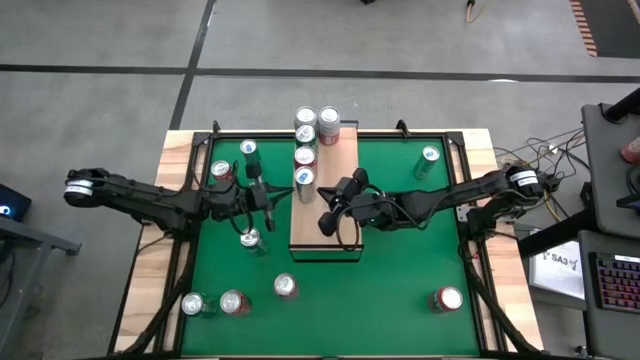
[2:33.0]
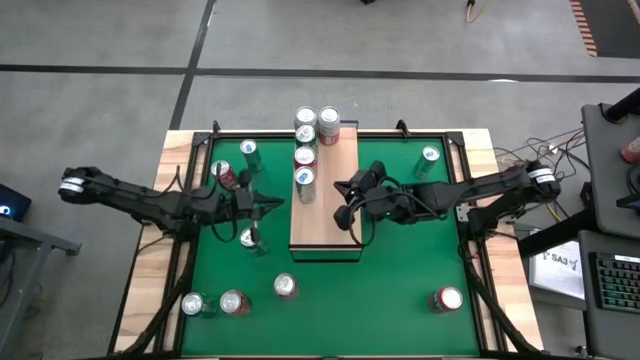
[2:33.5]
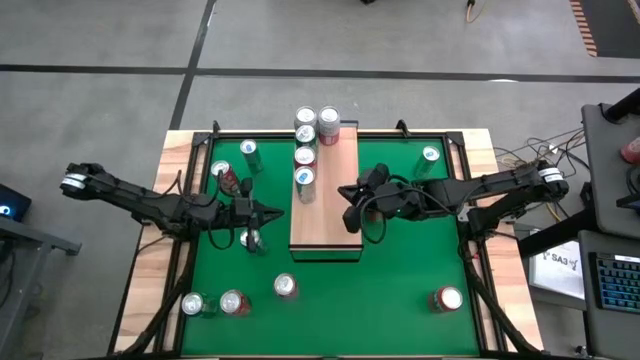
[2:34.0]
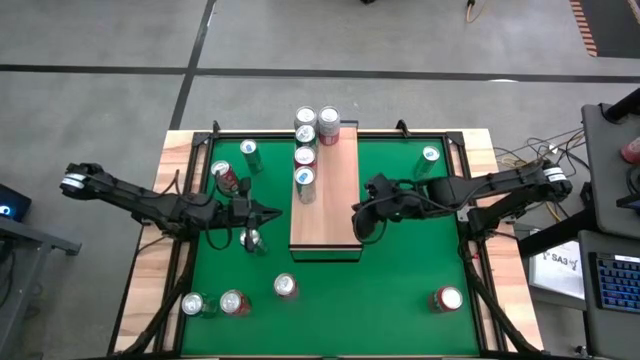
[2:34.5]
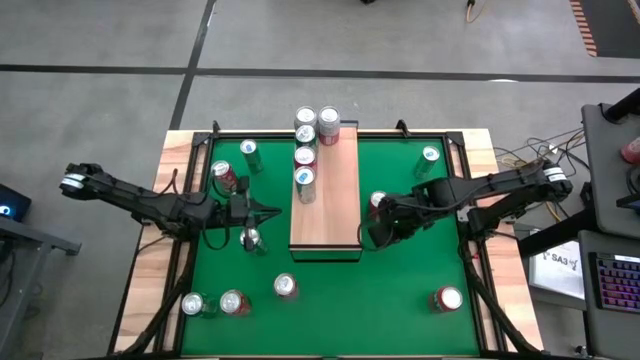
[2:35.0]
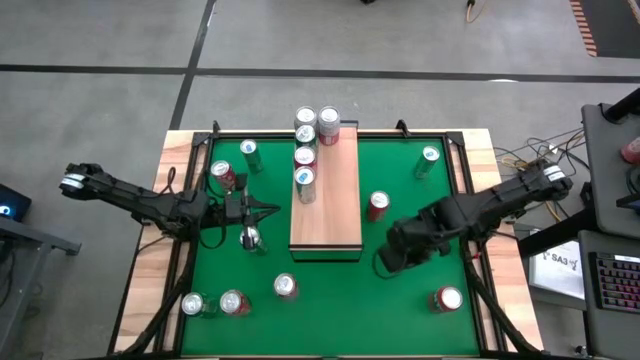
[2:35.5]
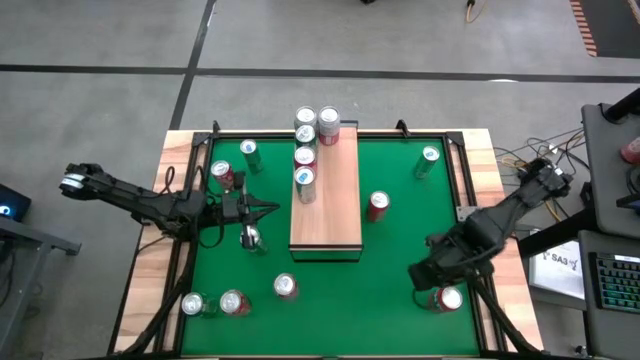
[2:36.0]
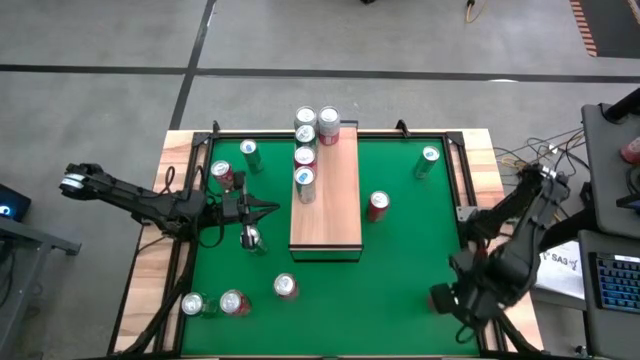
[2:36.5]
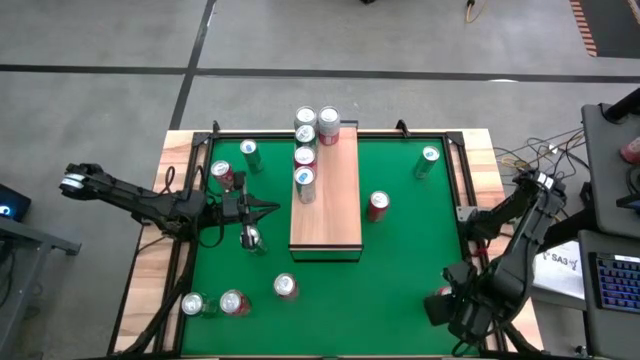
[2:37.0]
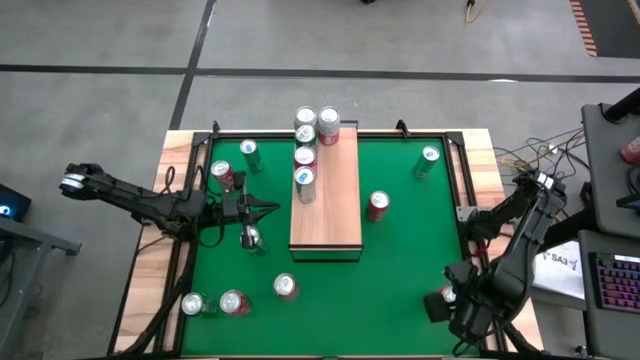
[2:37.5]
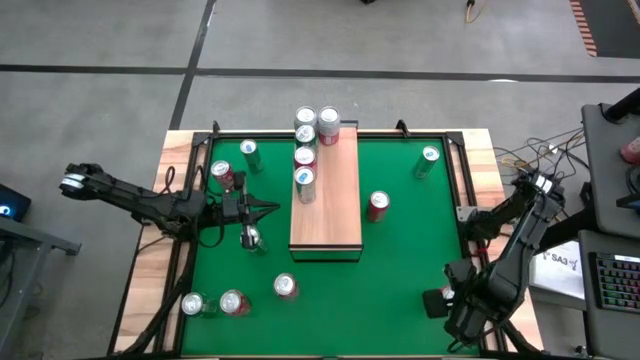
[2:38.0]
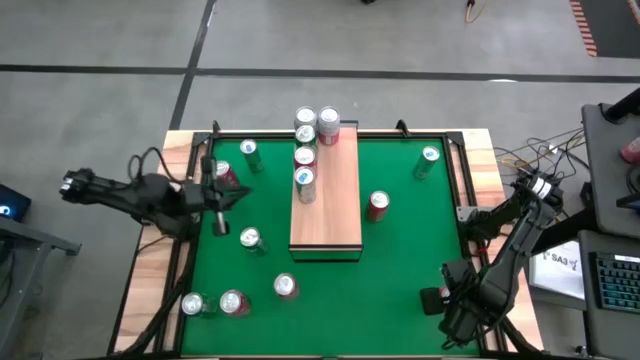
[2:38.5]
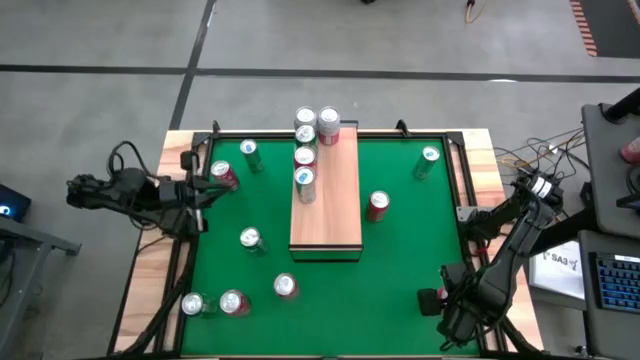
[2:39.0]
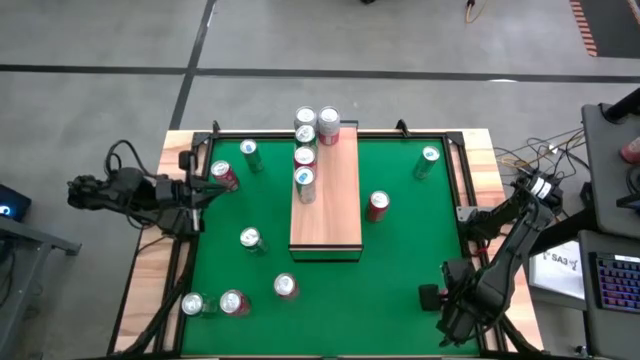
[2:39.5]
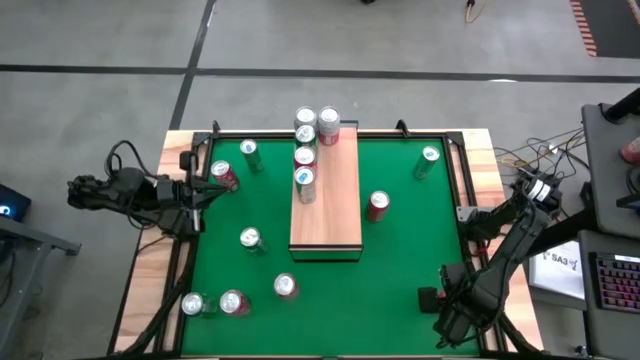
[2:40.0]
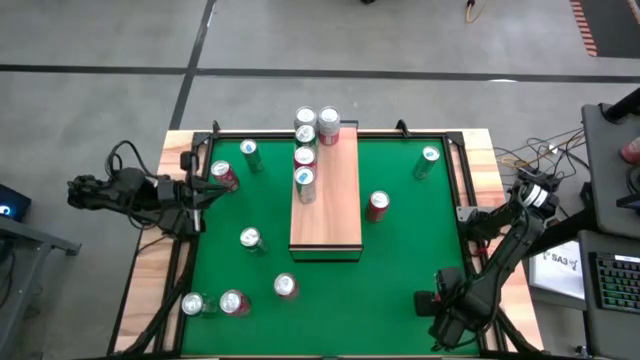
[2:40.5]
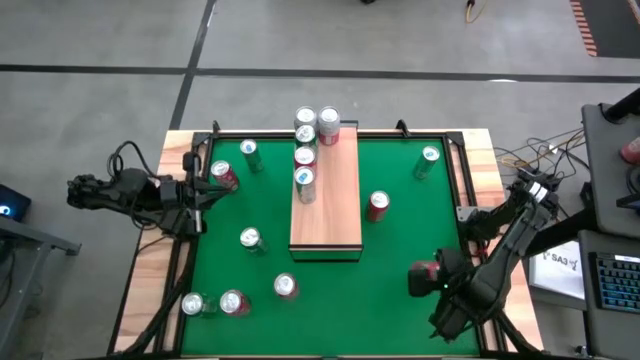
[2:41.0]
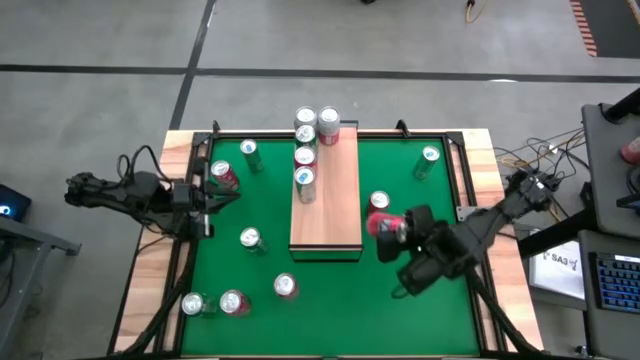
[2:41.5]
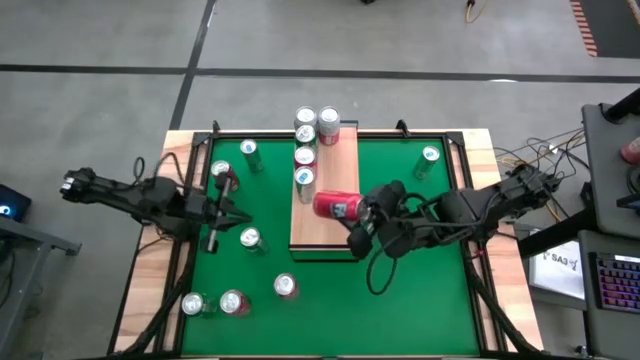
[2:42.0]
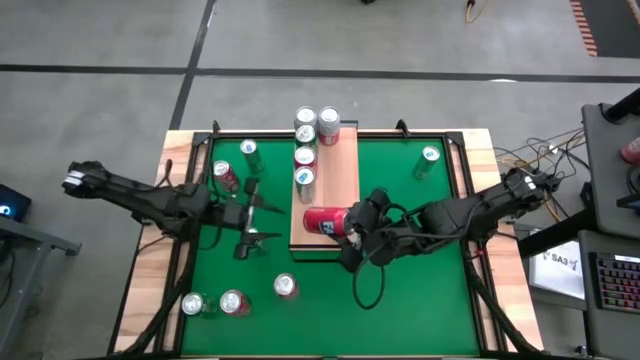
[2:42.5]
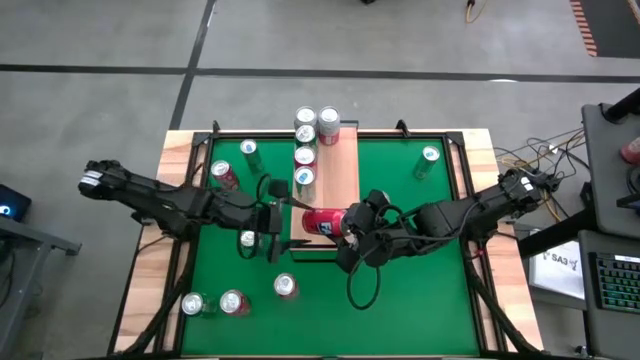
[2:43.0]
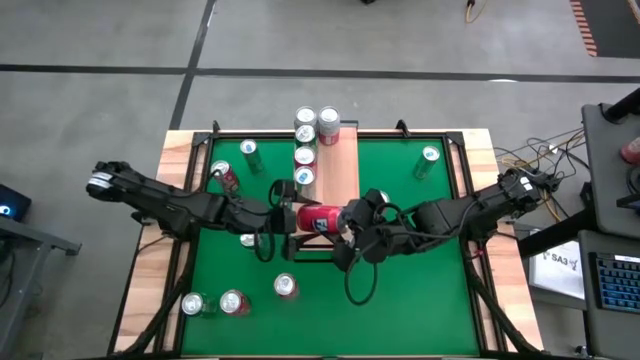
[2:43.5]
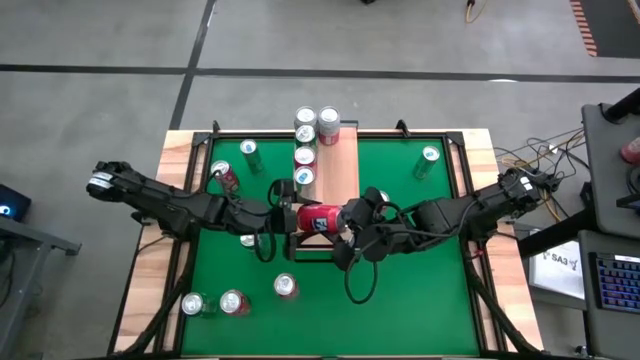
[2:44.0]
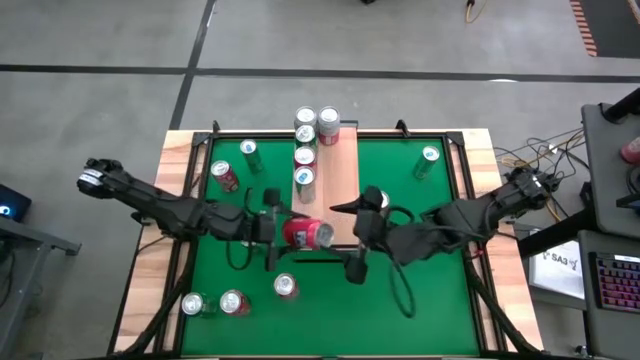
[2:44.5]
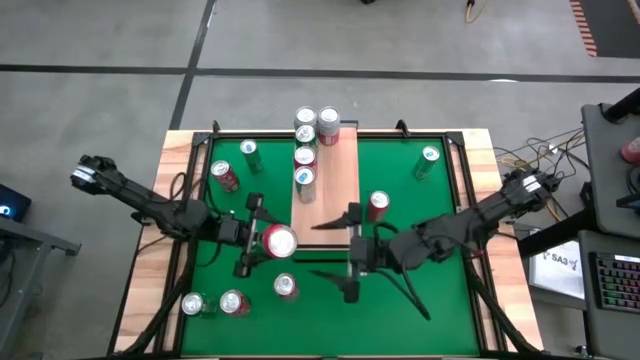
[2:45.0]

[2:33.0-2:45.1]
Task: Place canned beverage on shelf
Put the orange can on the shelf

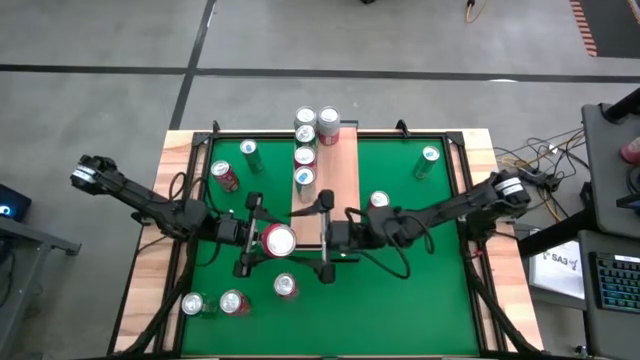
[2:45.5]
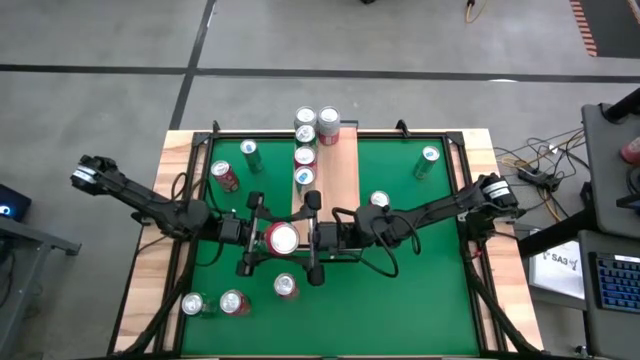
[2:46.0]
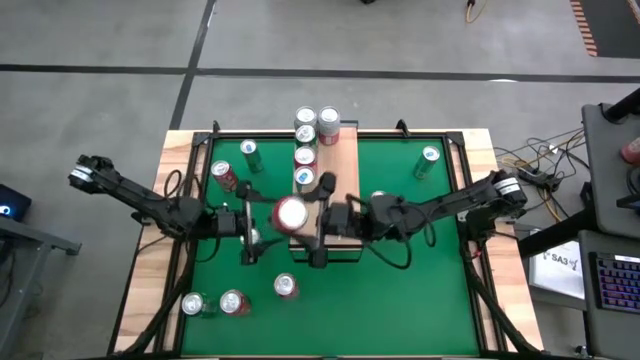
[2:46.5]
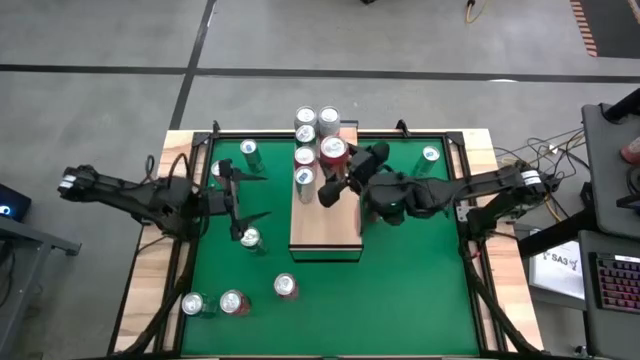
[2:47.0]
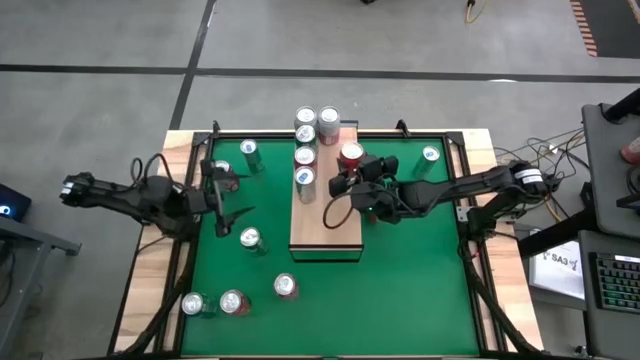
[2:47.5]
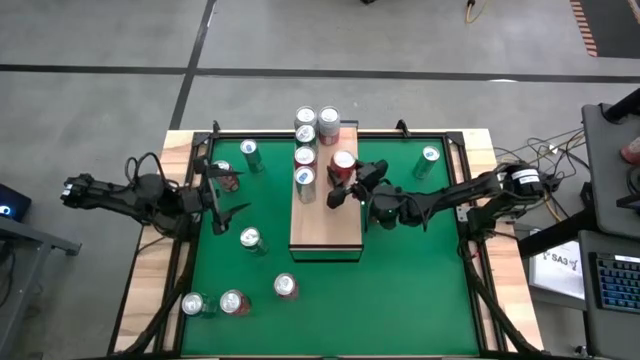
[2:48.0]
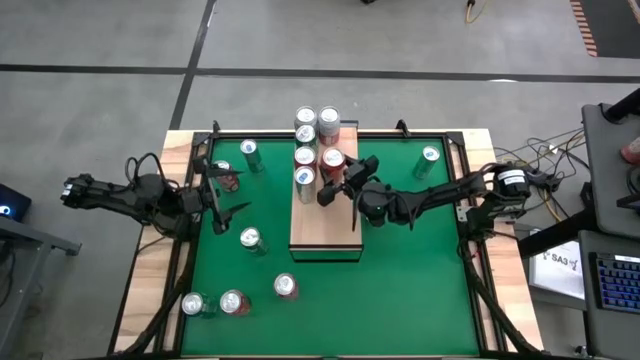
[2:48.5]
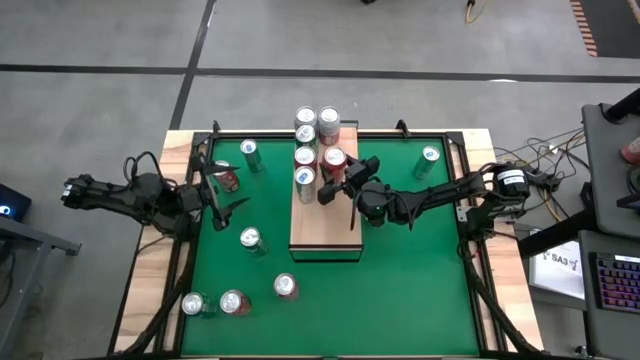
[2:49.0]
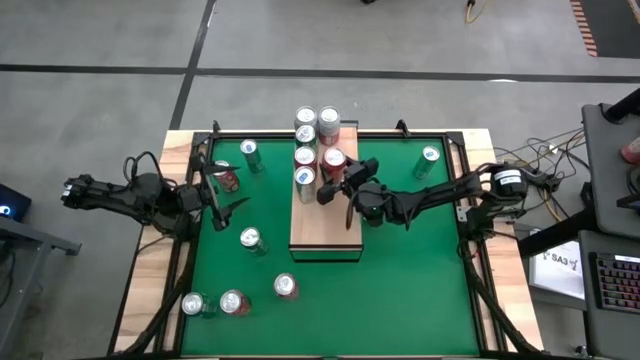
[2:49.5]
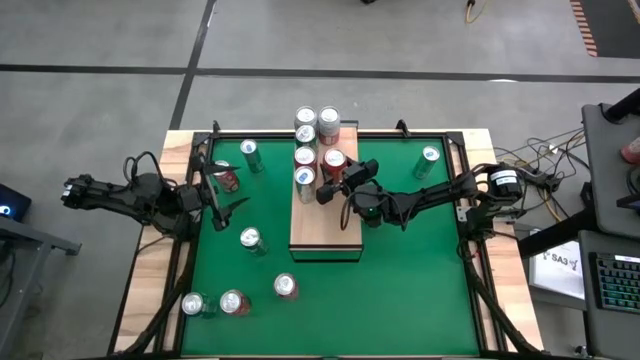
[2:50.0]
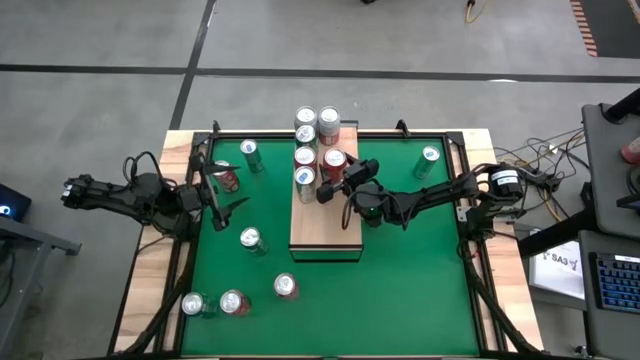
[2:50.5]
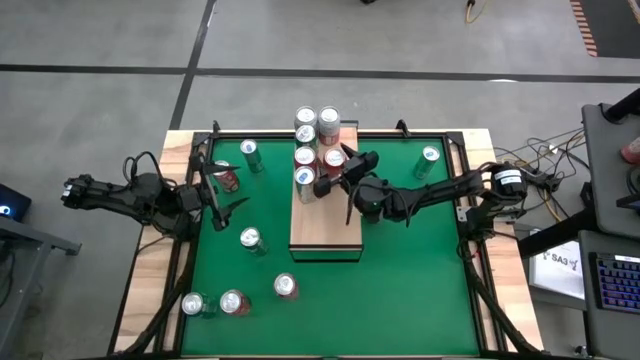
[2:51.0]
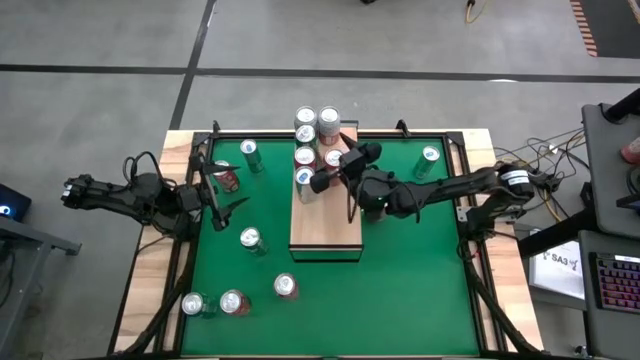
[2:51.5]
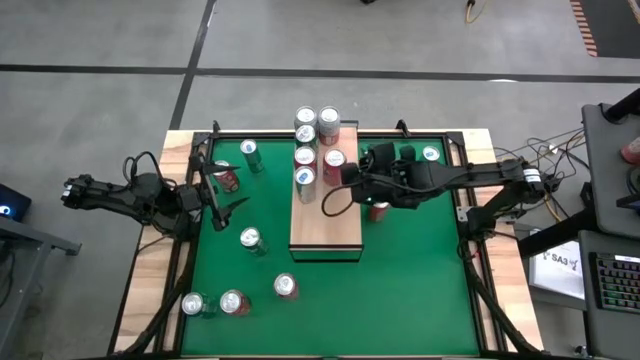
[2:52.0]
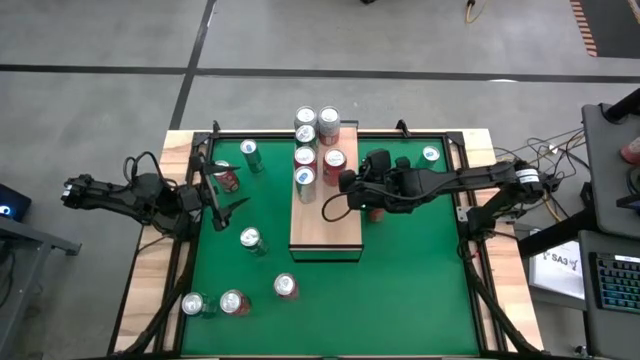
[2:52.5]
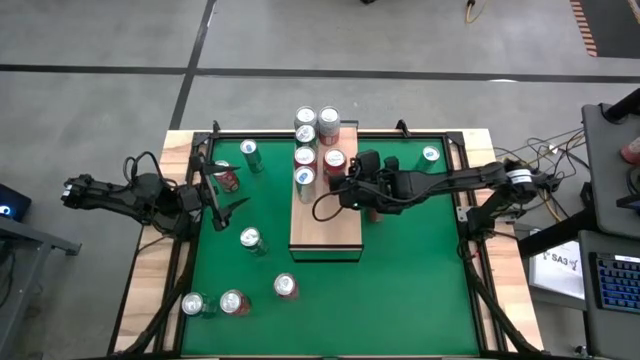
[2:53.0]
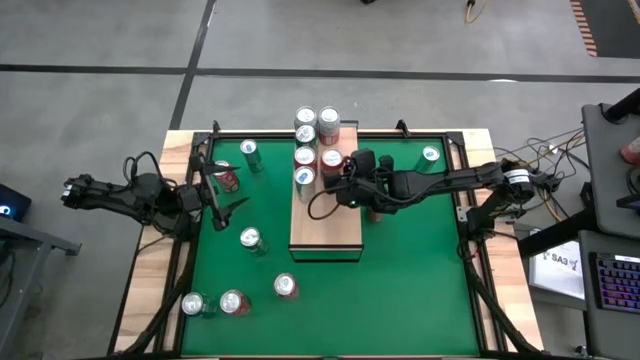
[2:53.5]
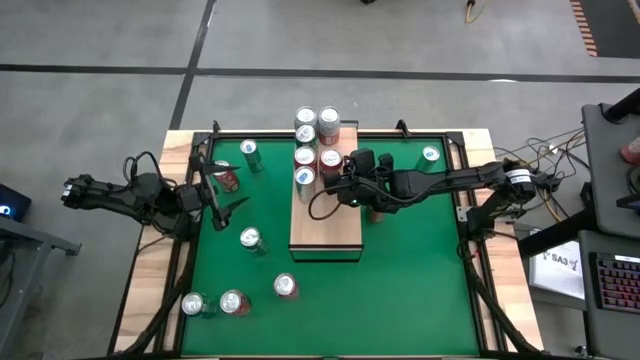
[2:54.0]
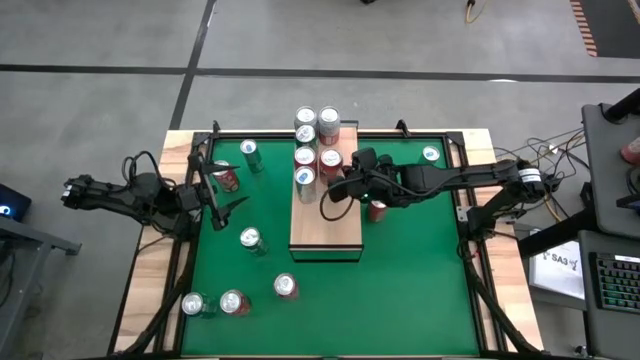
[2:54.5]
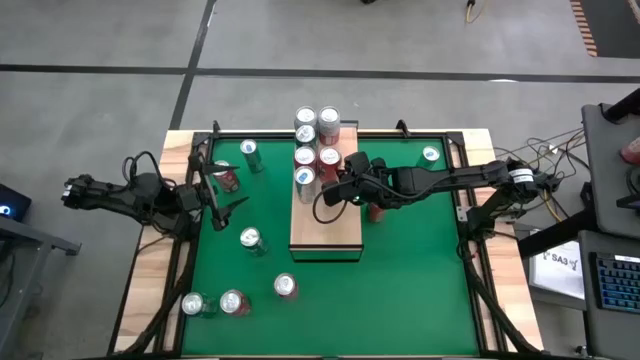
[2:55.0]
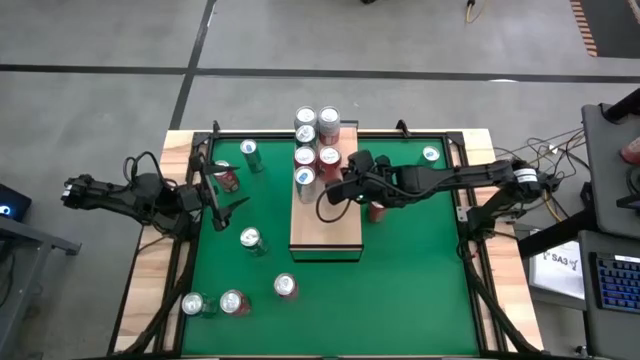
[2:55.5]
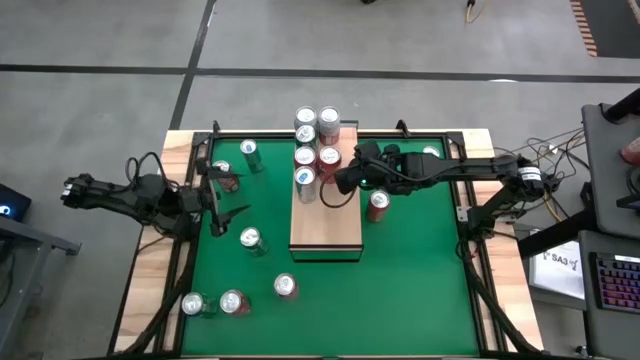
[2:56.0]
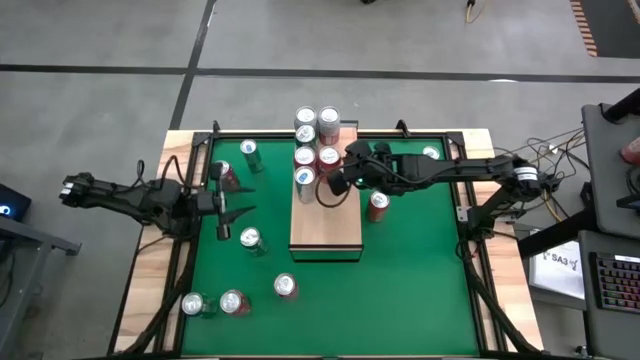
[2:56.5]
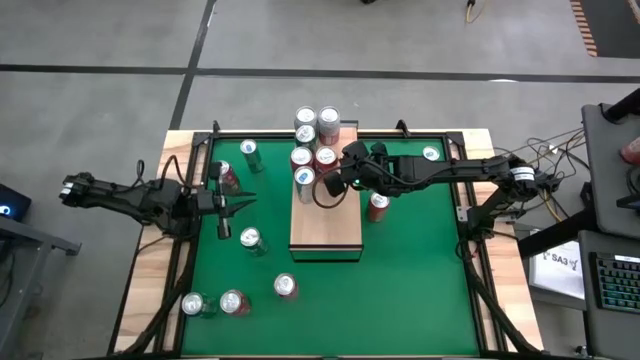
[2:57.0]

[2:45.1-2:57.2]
Put the orange can on the shelf
